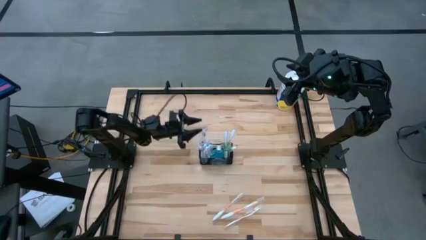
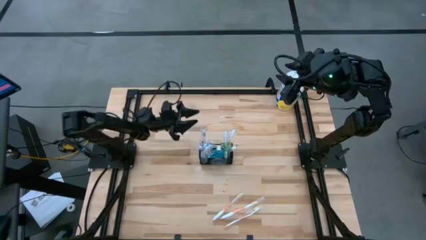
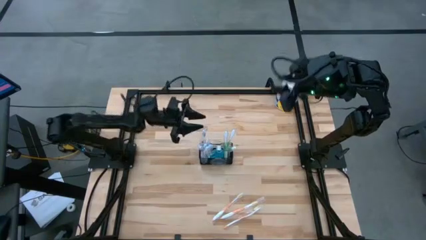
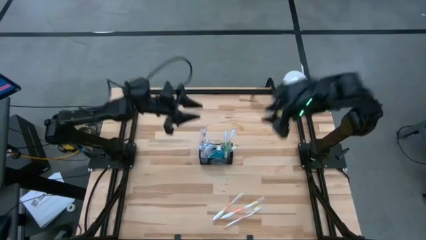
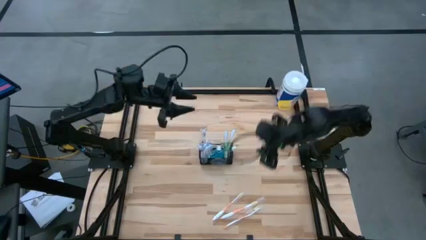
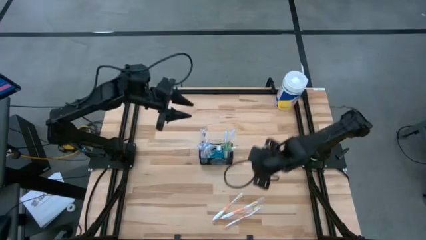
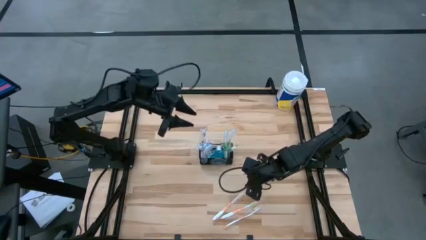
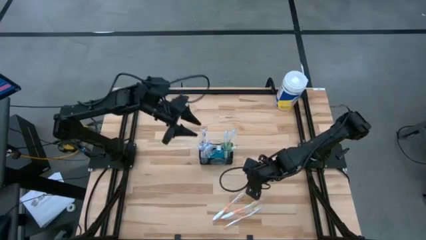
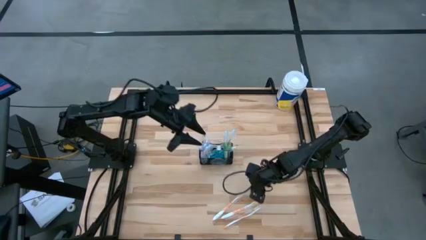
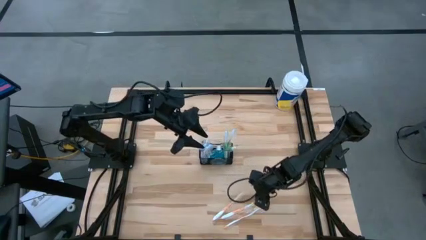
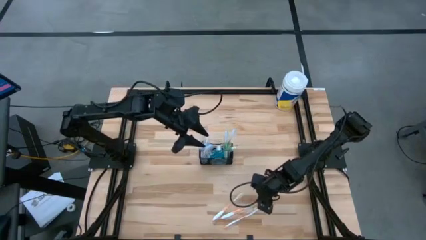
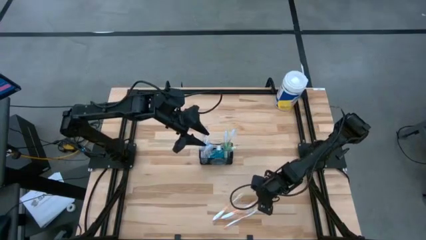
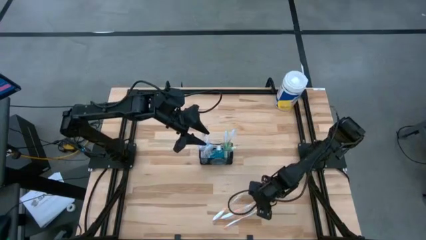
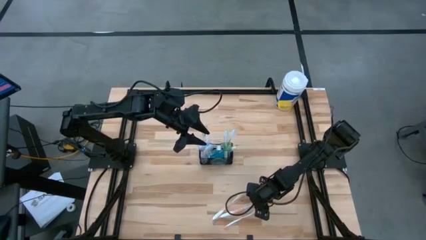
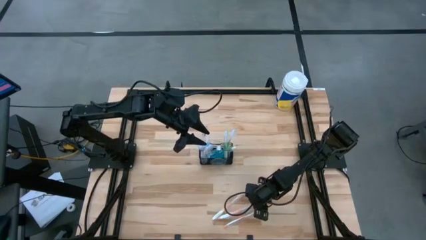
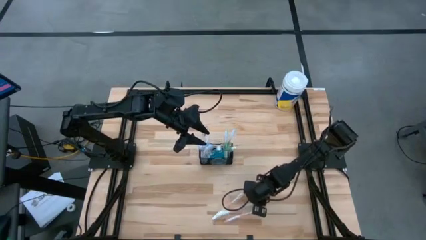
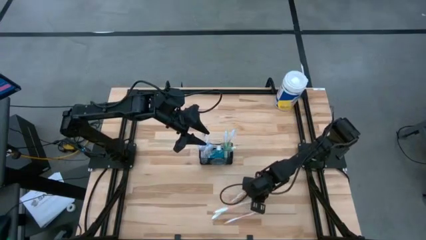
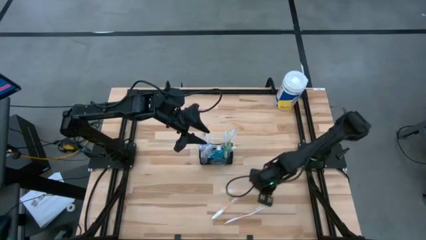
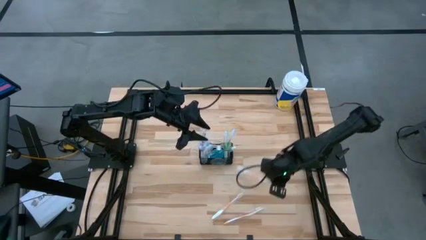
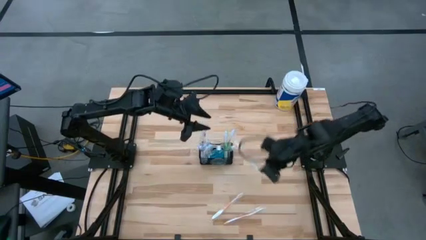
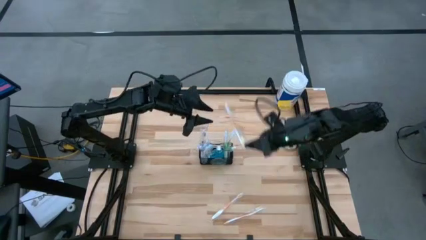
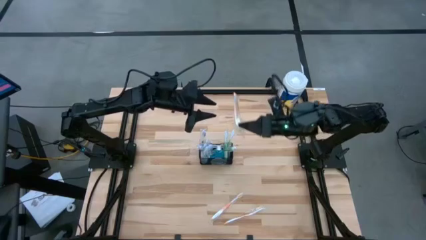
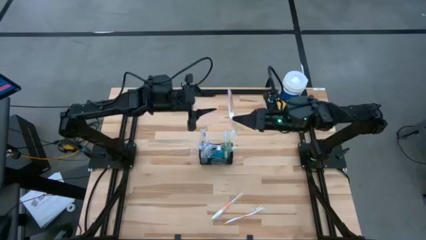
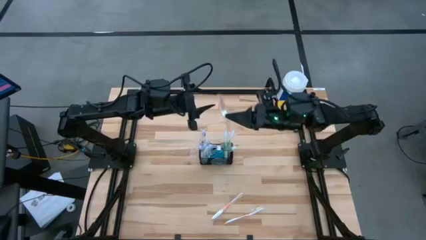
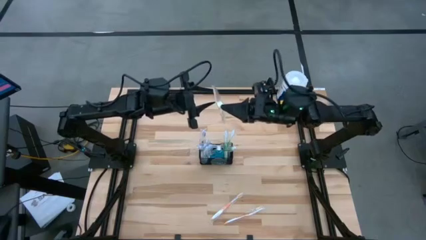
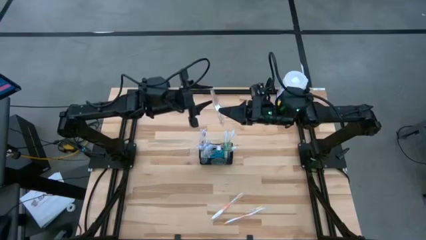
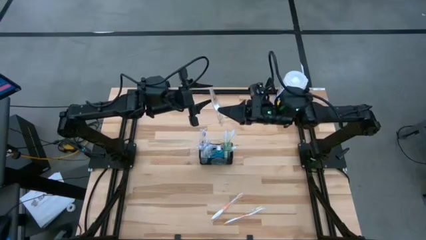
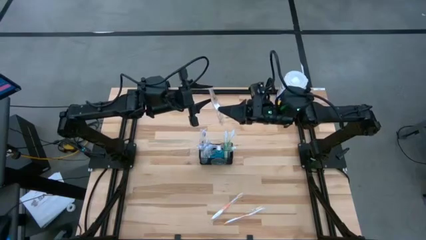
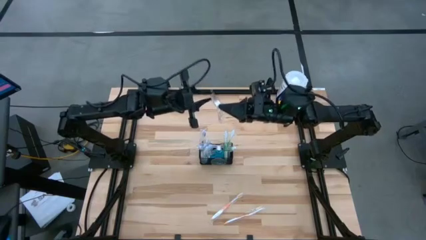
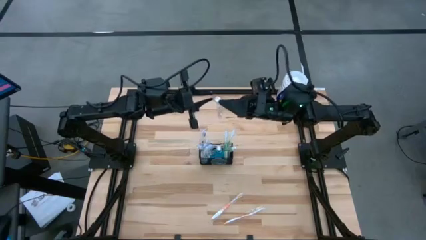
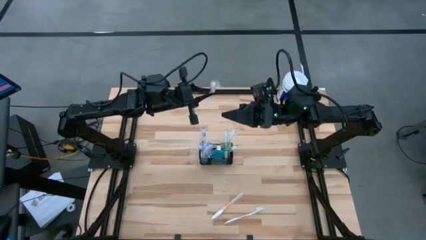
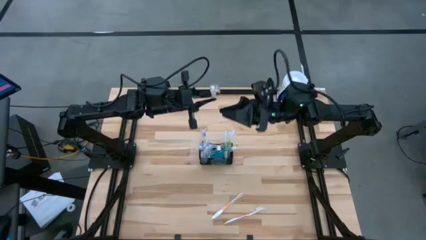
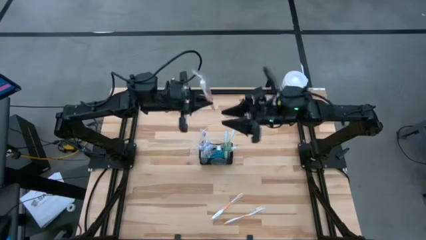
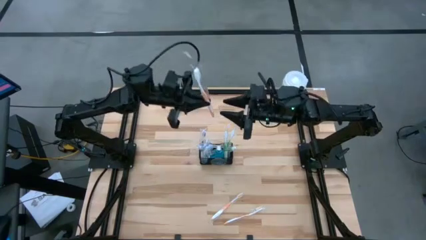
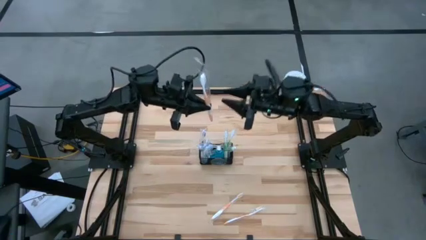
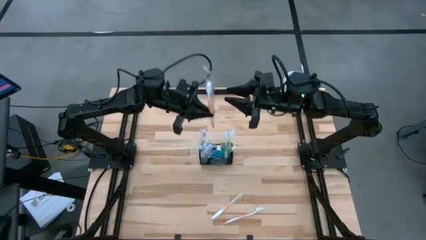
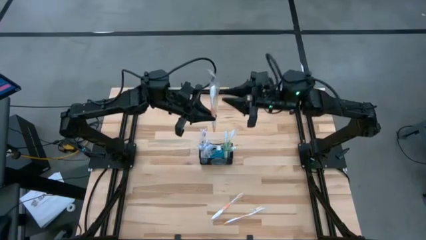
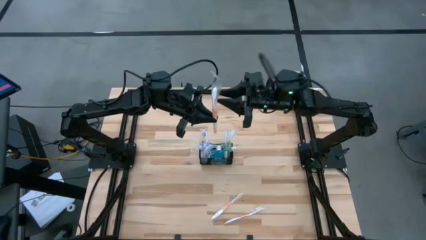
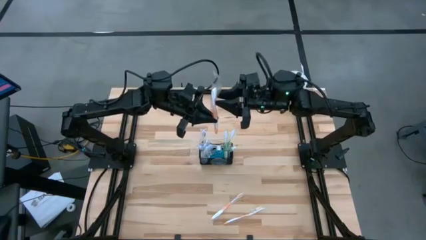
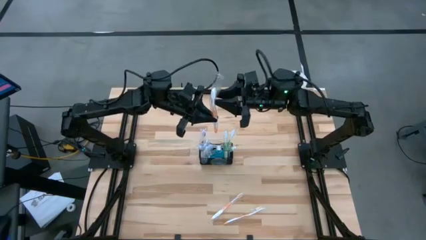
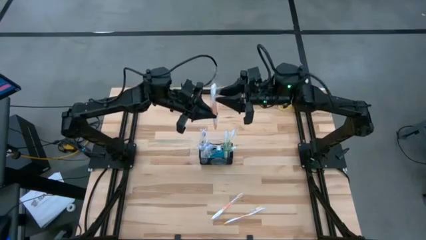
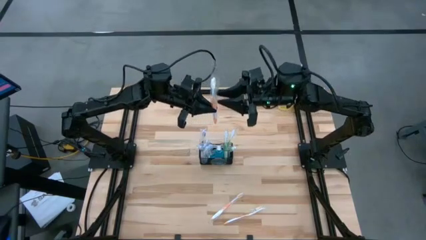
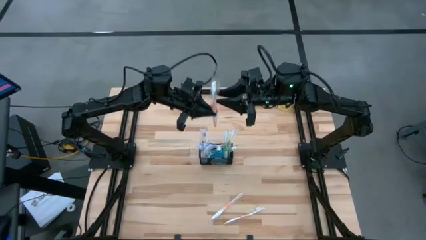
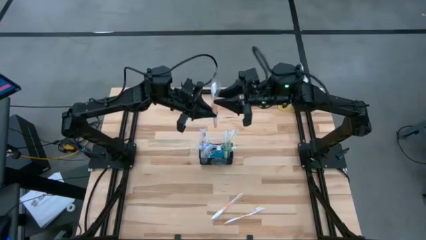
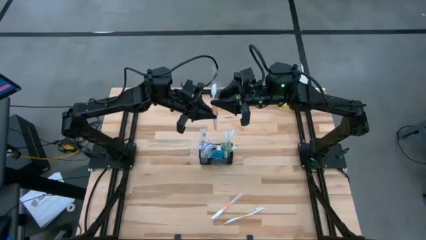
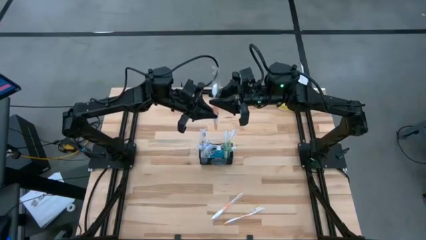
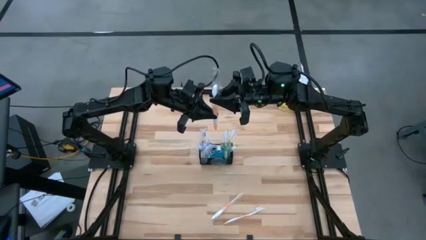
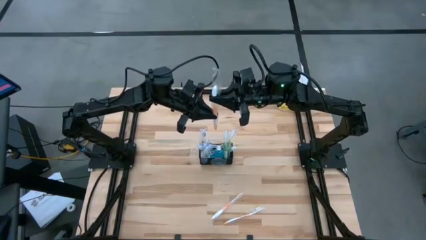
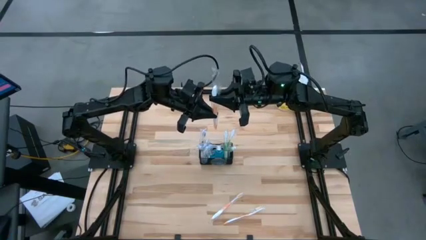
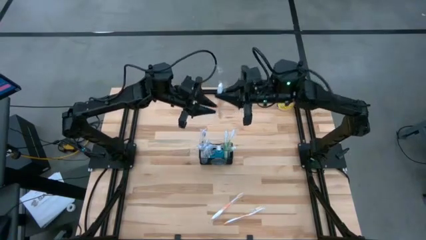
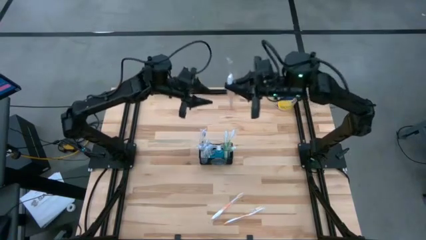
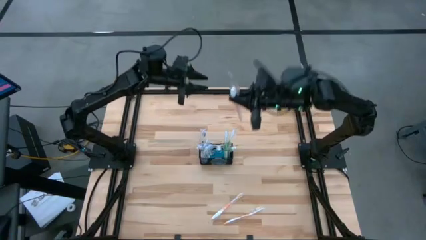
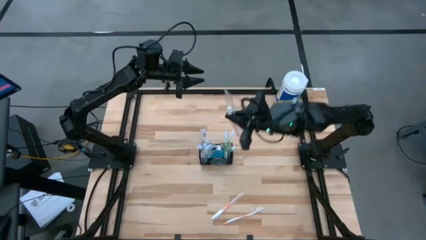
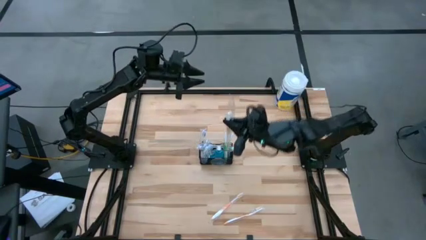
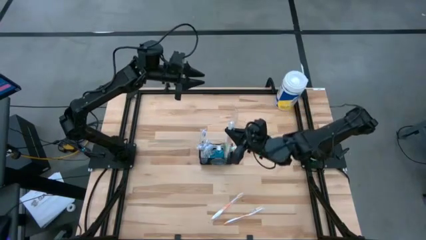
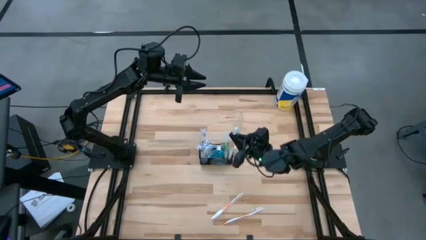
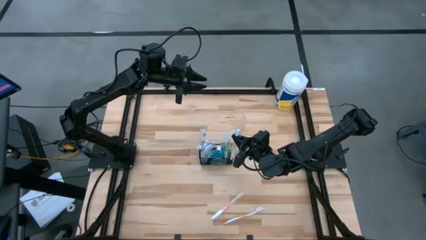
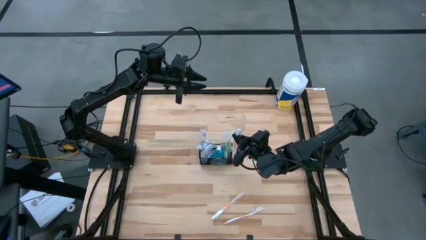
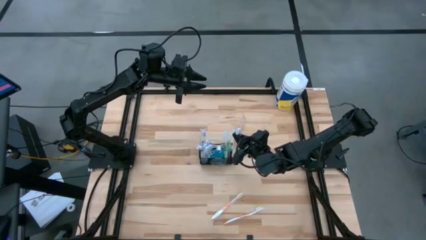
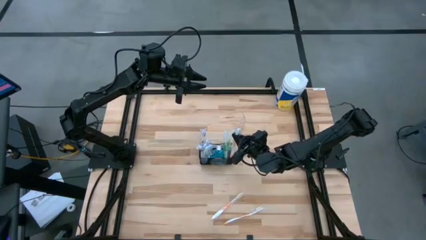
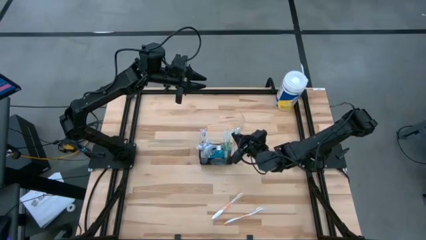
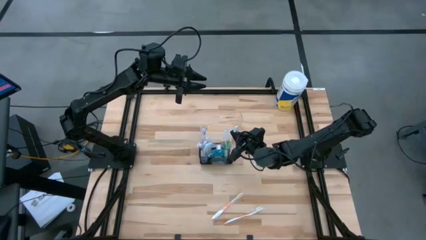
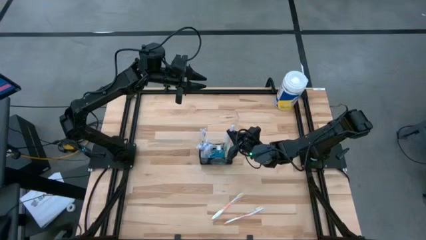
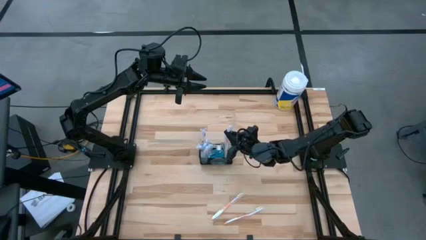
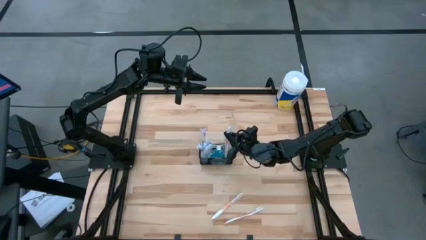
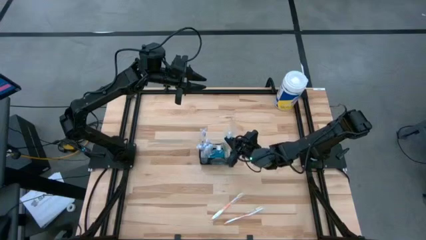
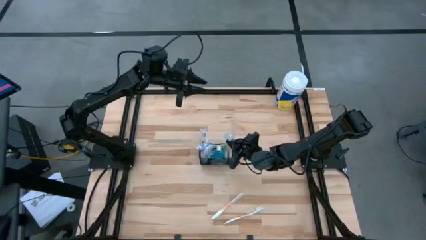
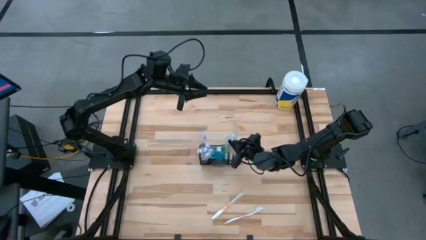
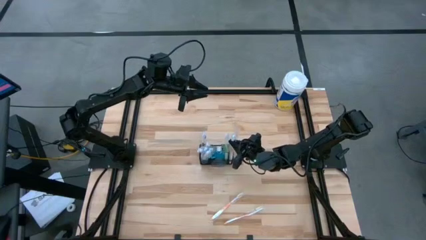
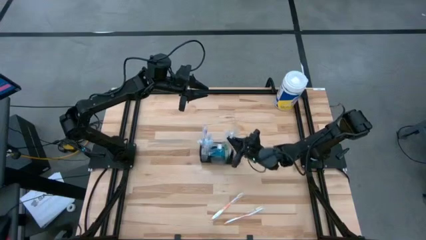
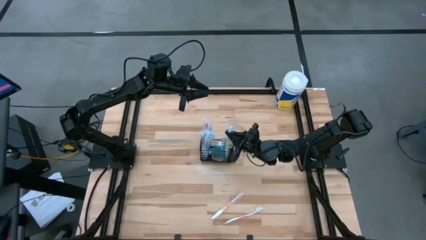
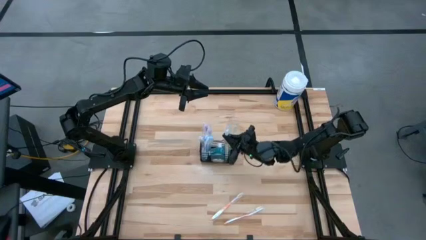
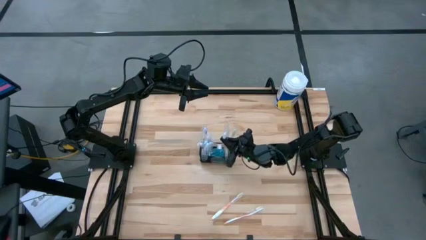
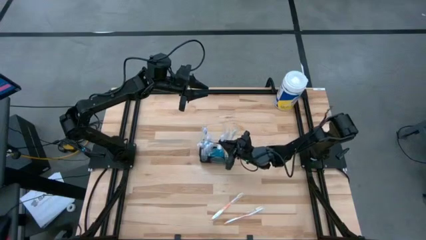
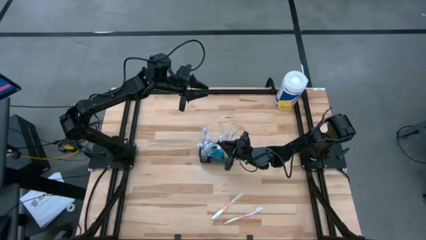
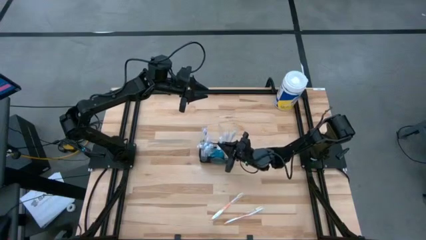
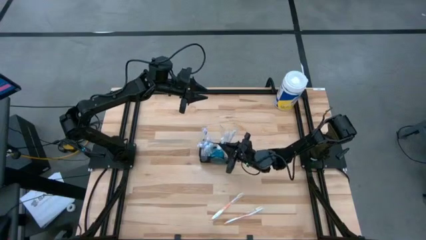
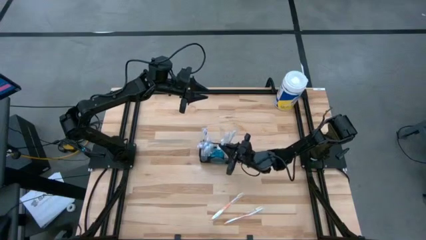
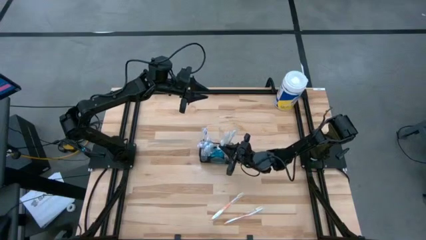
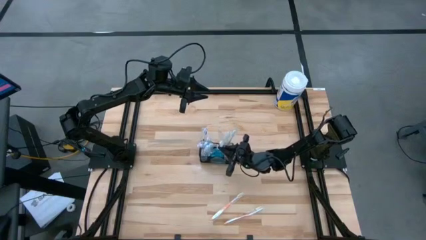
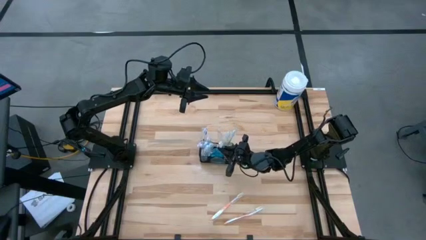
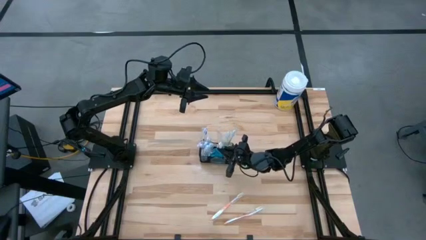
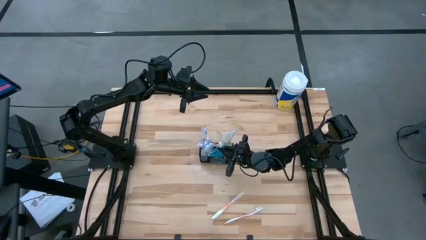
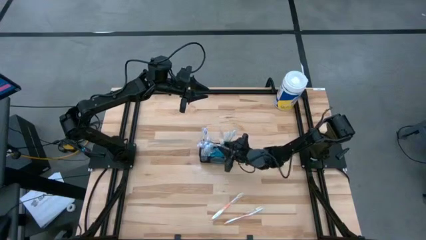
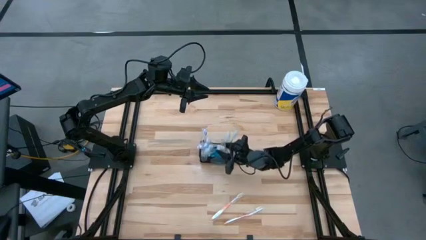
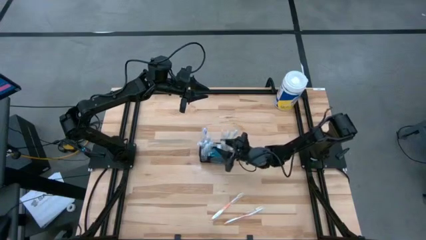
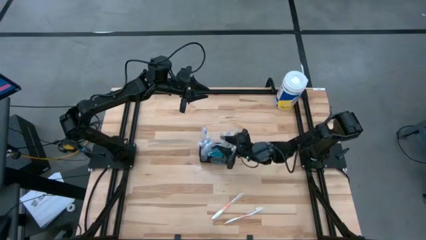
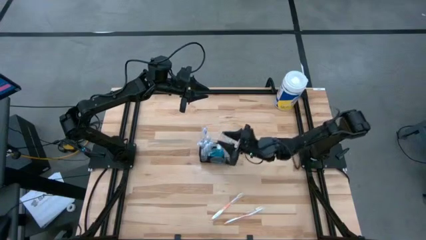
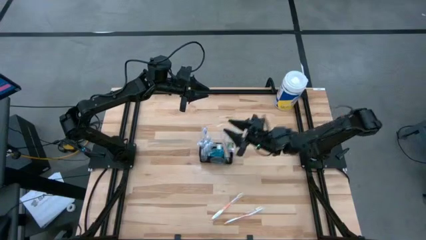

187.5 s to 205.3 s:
Task: Pick & Place toothbrushing station
Put the orange toothbrush into the black wire organizer
